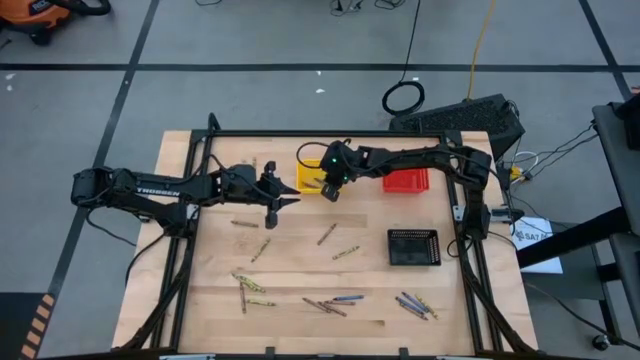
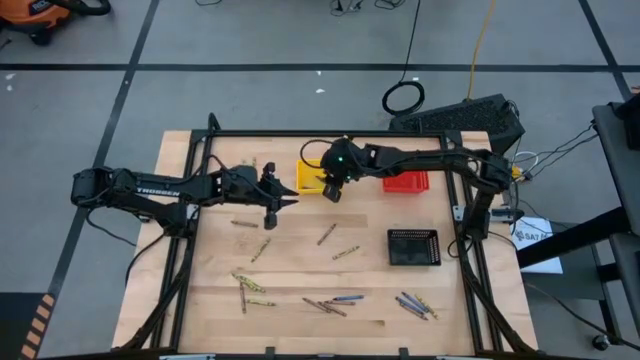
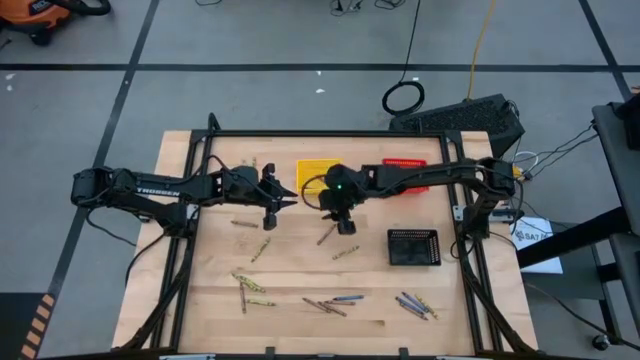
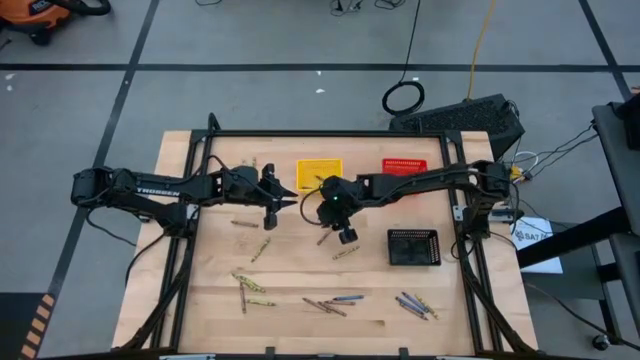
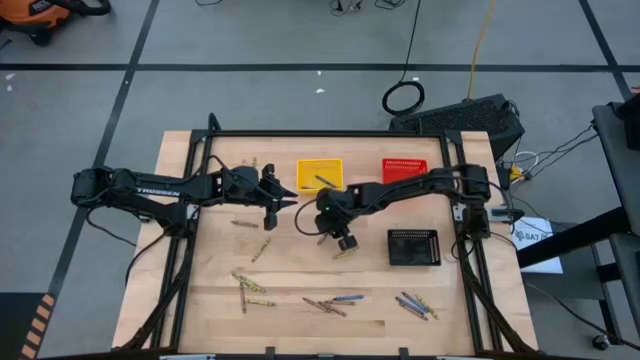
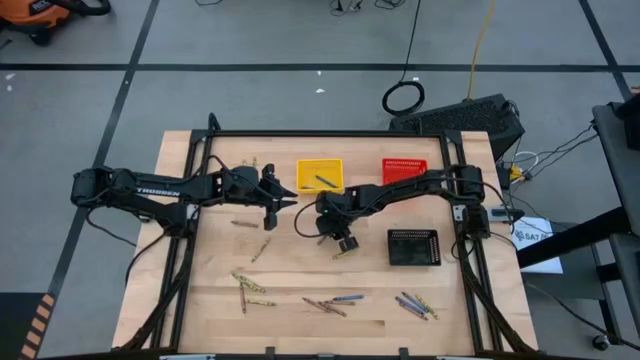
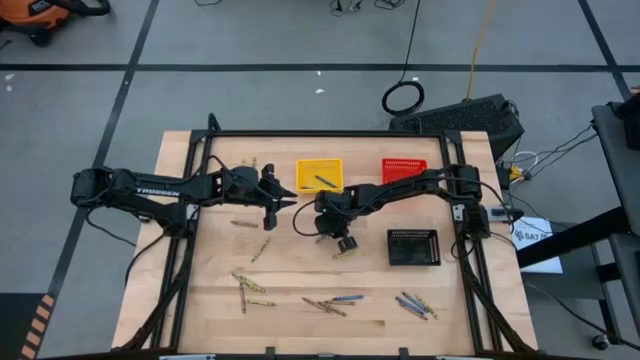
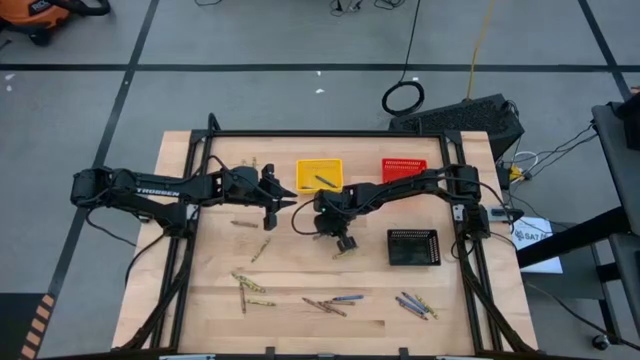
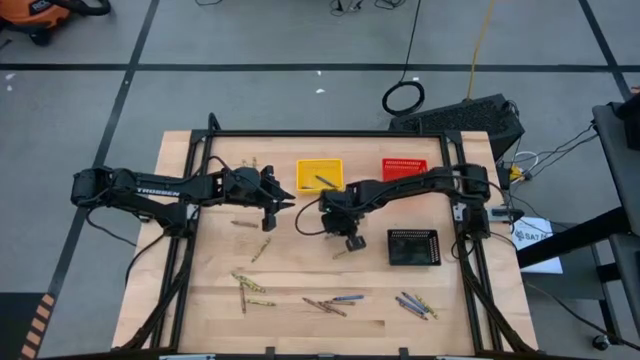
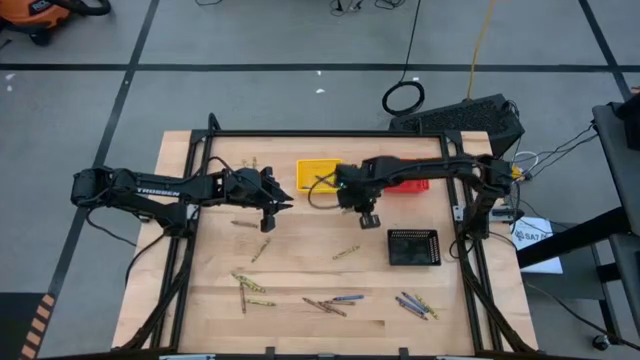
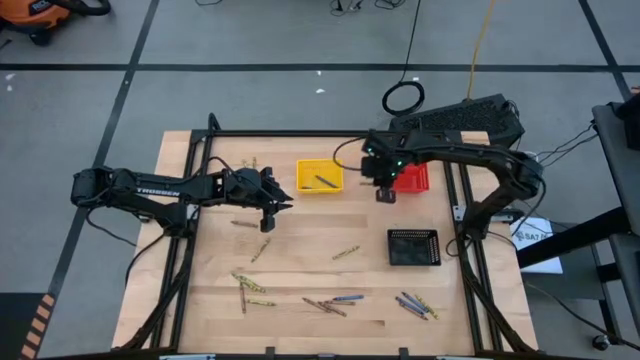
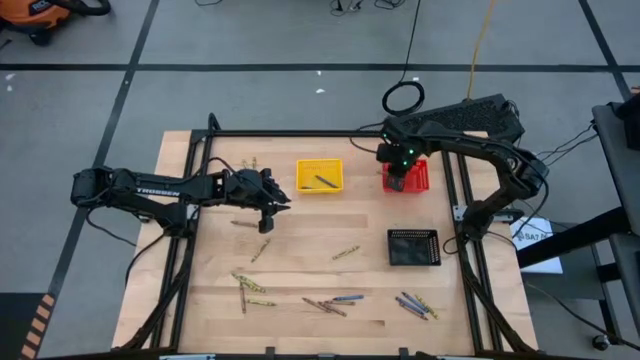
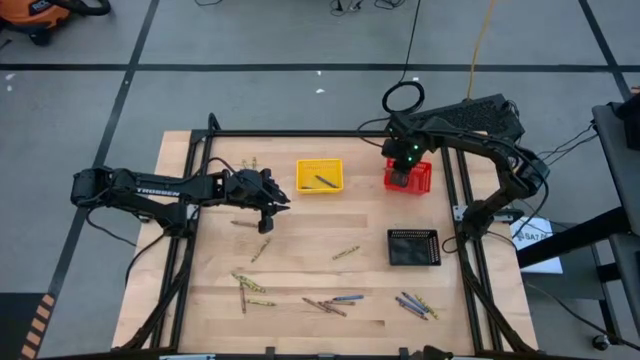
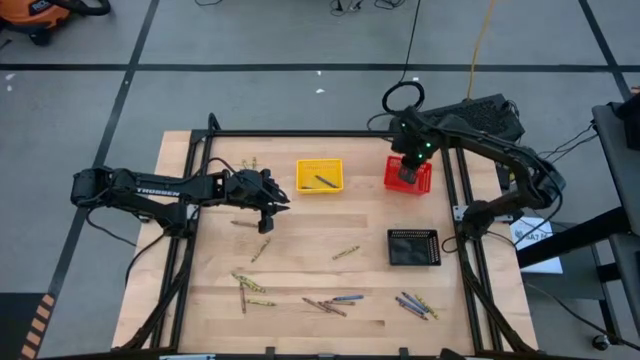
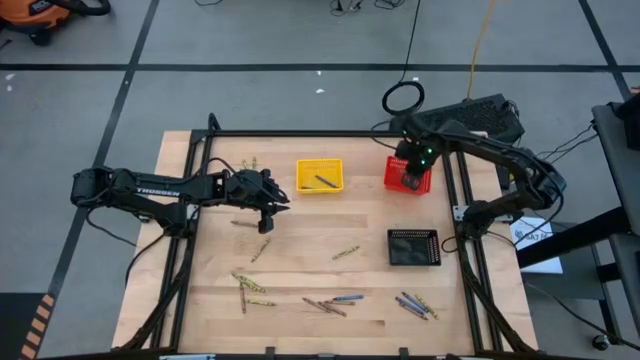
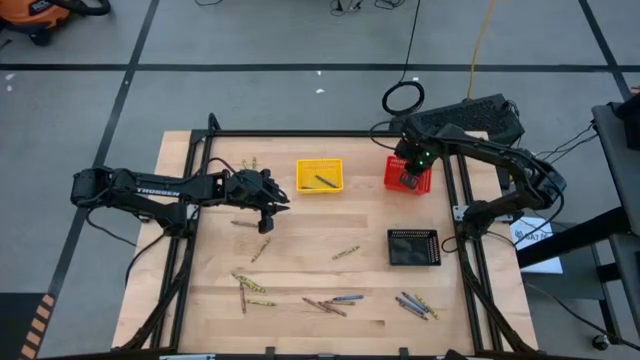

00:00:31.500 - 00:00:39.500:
Task: Sort crayons
Put the brown crayon into the red bin

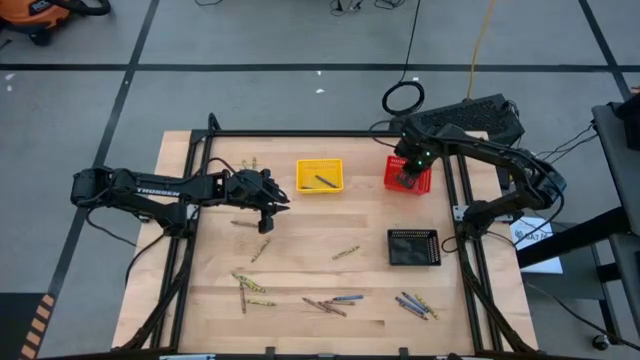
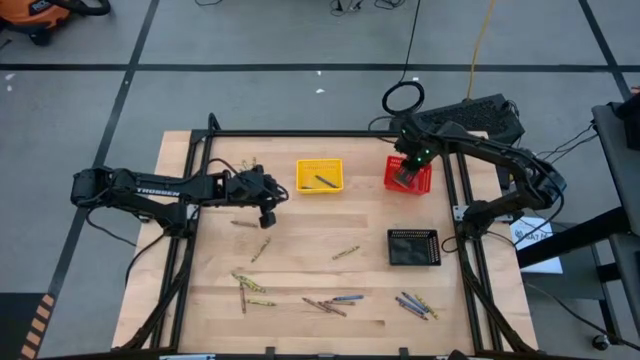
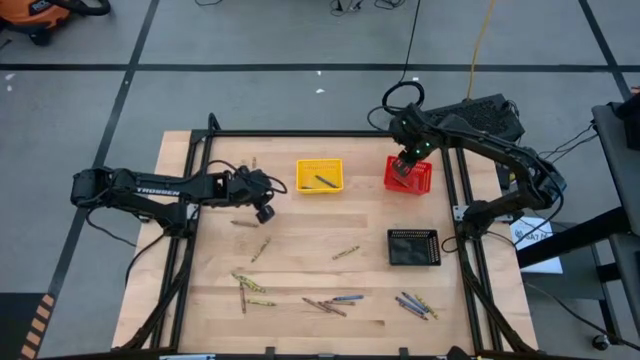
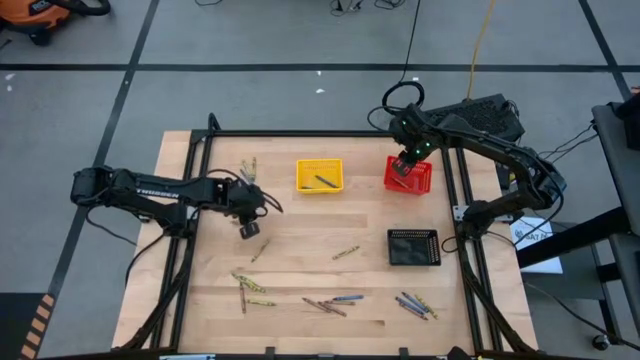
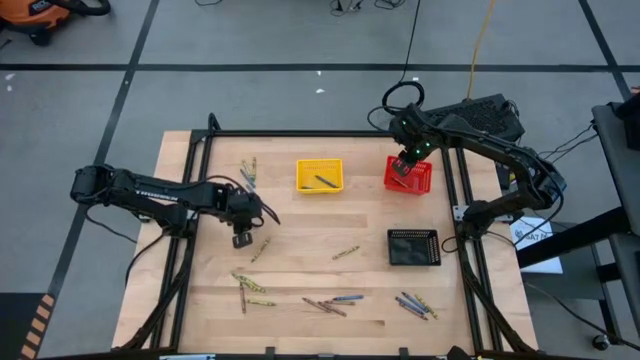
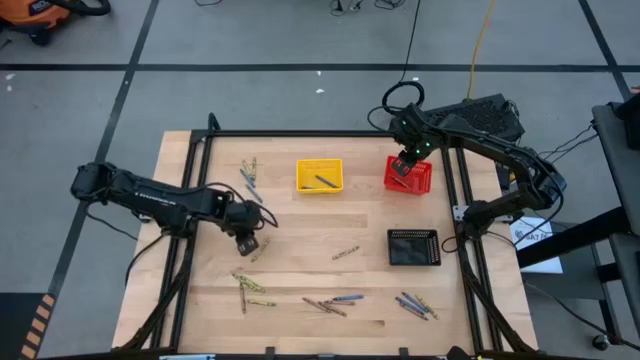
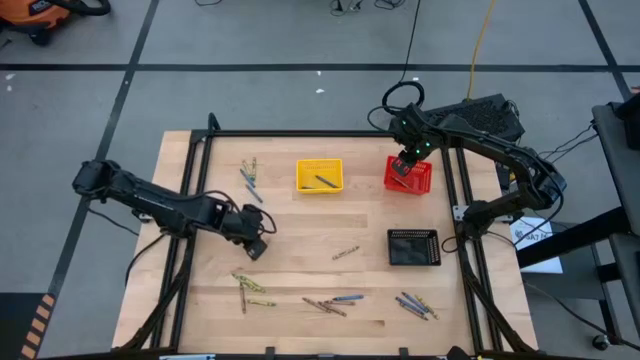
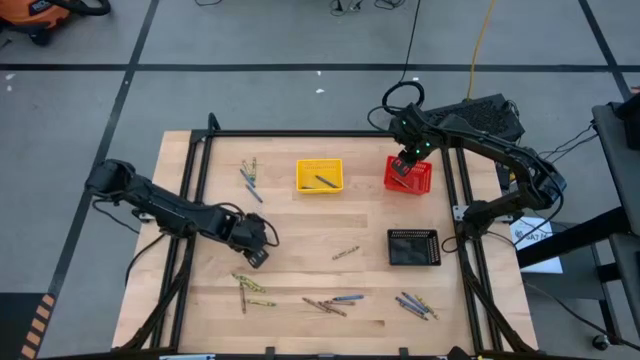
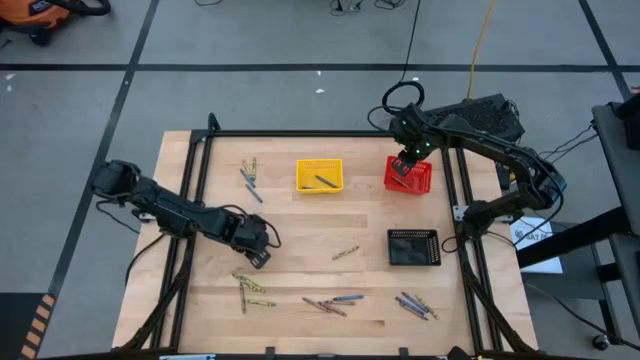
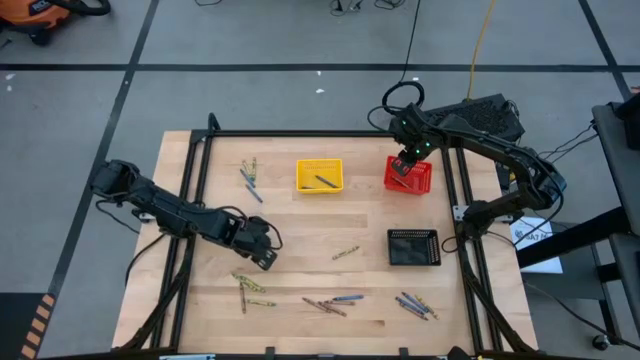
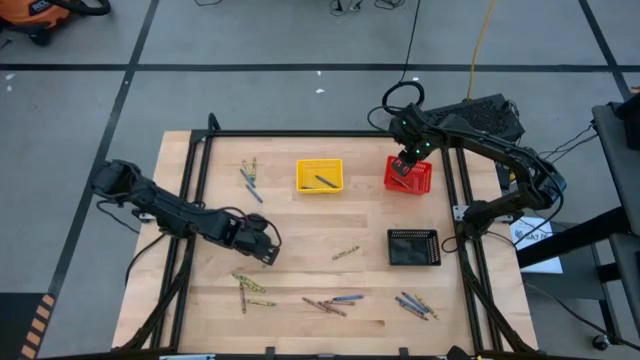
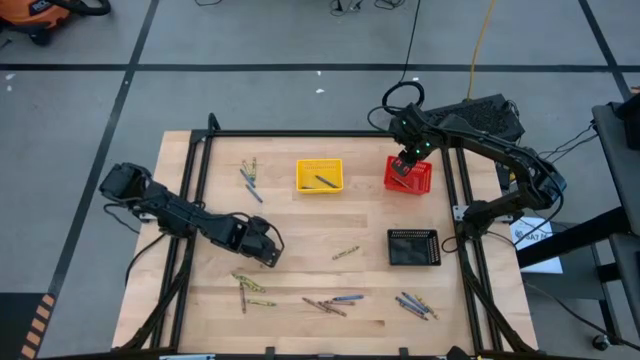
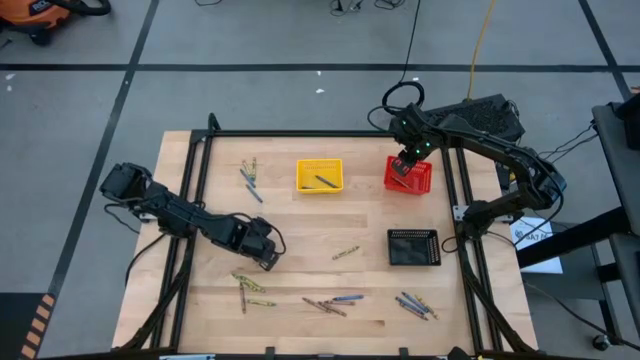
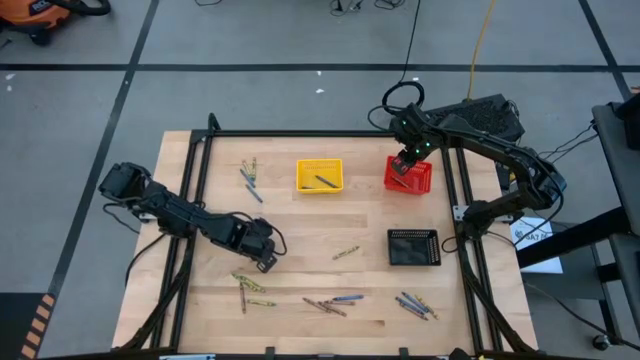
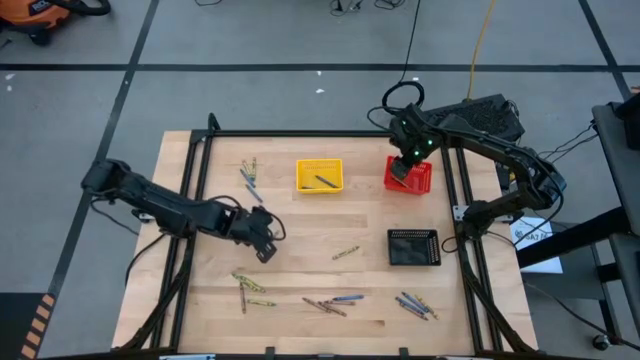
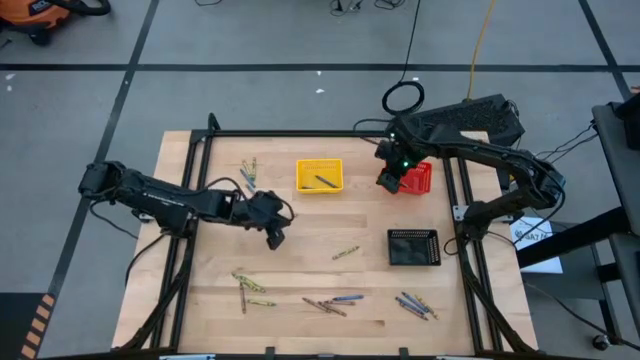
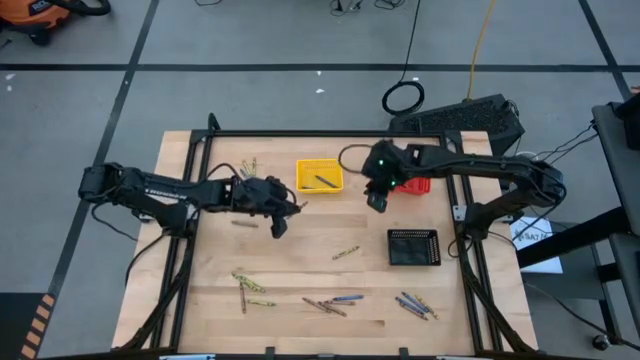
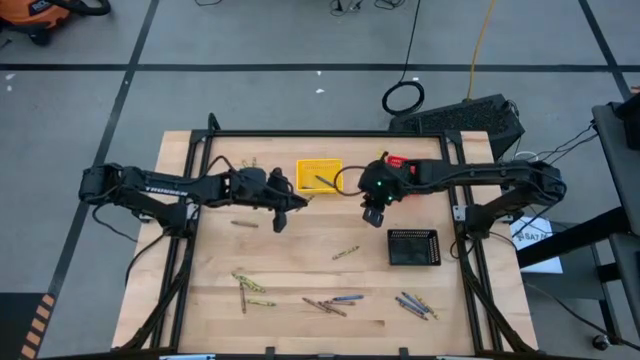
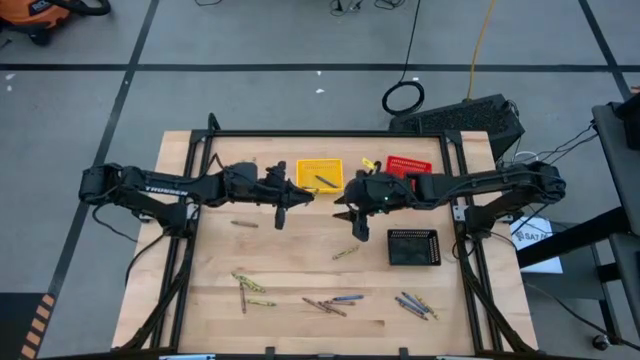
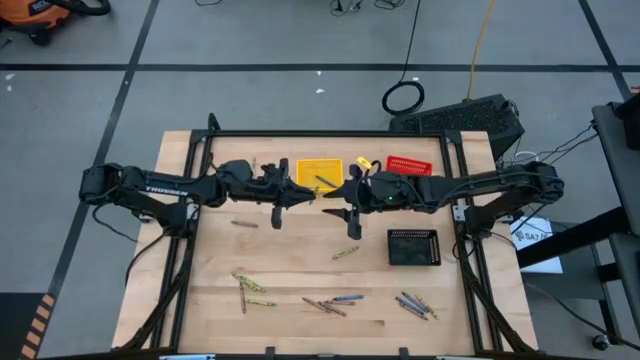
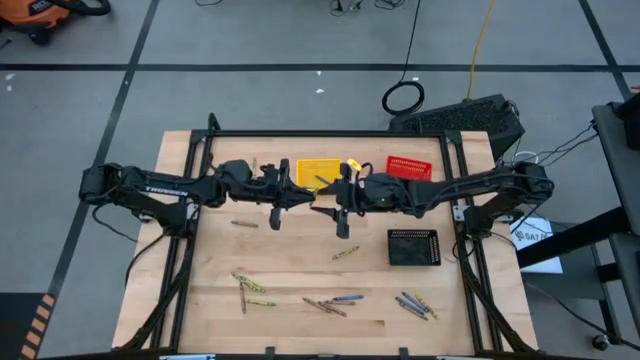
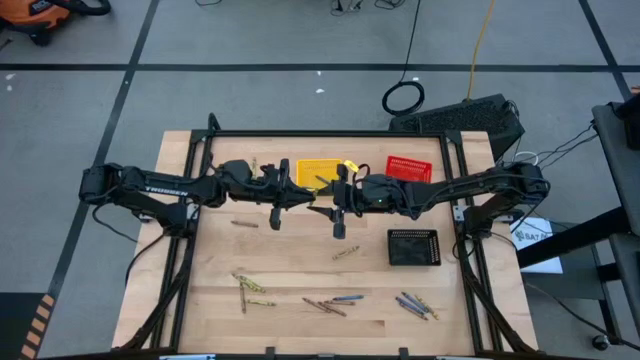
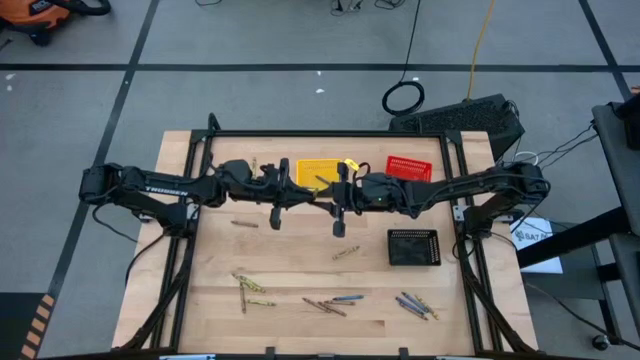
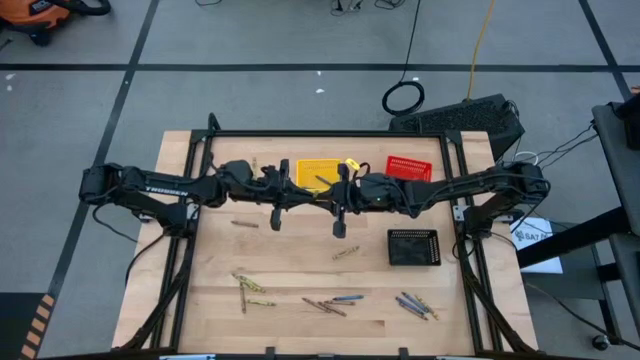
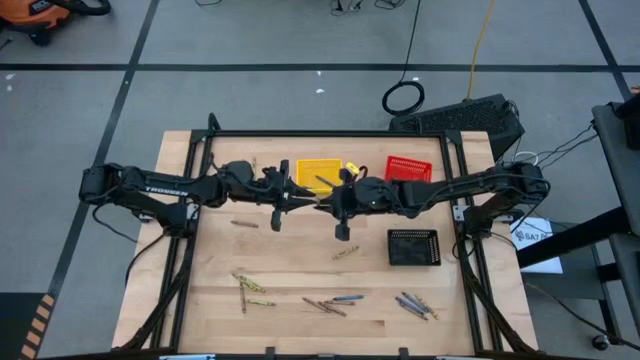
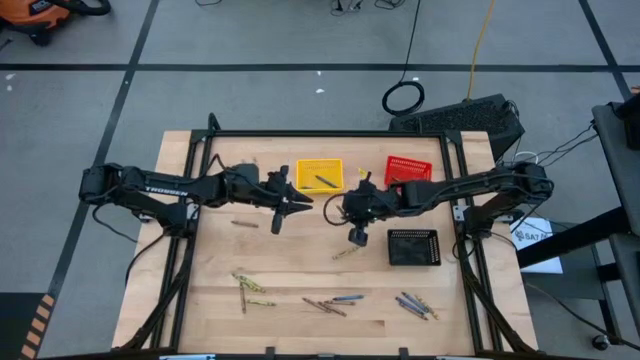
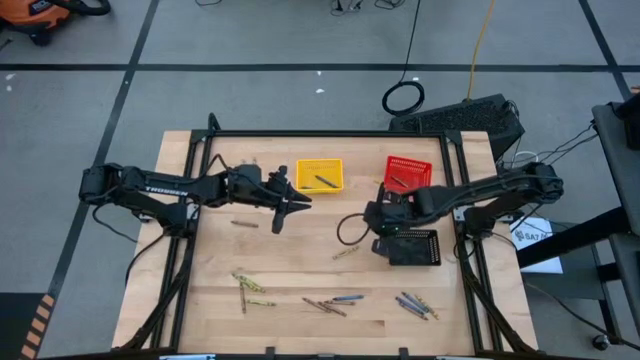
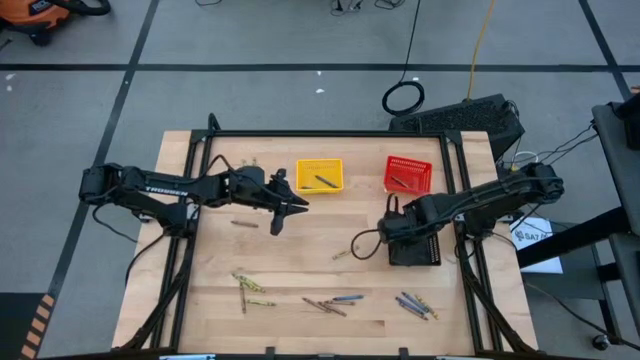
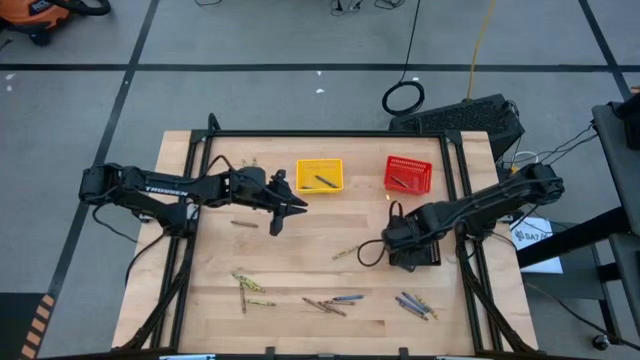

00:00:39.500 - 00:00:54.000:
Put the green crayon into the black bin
